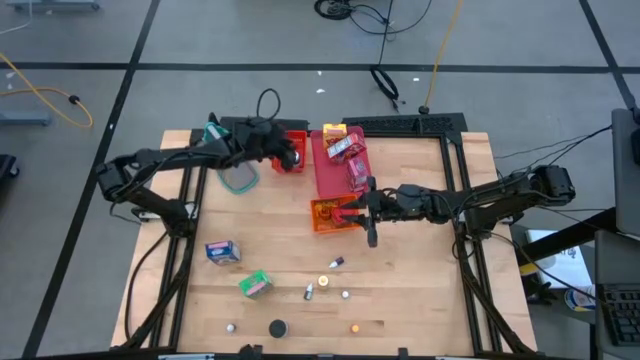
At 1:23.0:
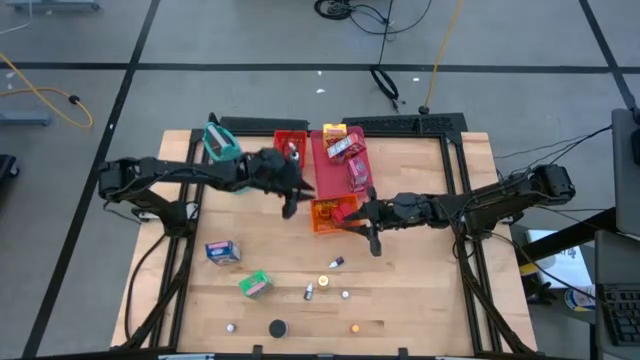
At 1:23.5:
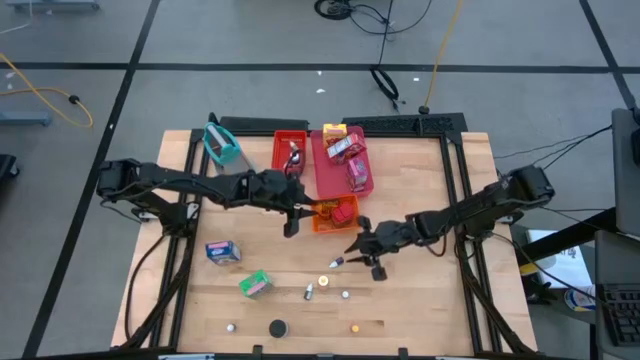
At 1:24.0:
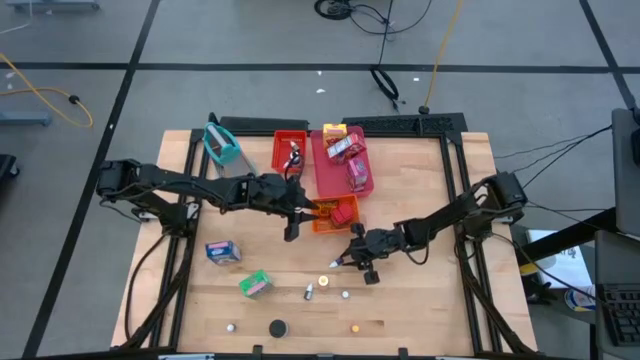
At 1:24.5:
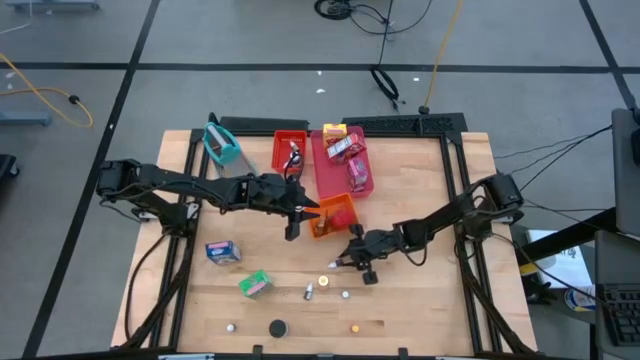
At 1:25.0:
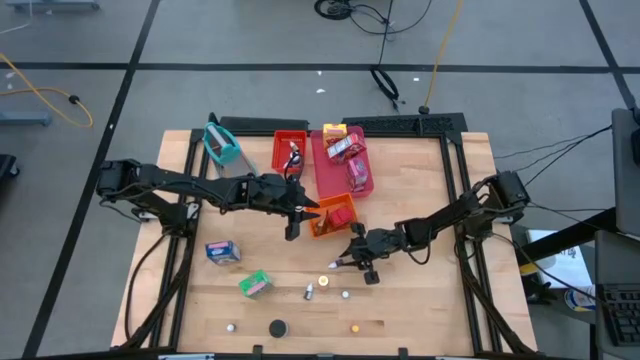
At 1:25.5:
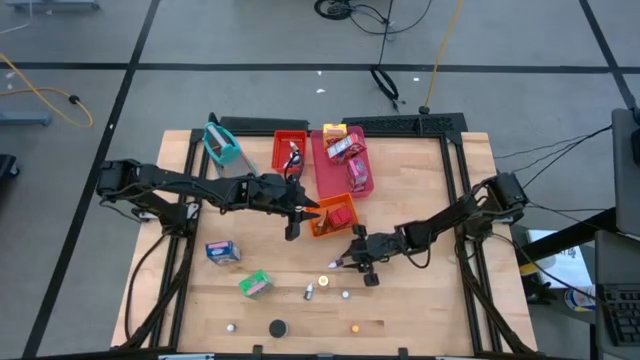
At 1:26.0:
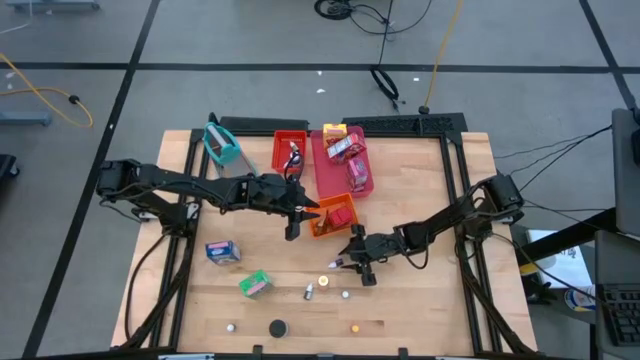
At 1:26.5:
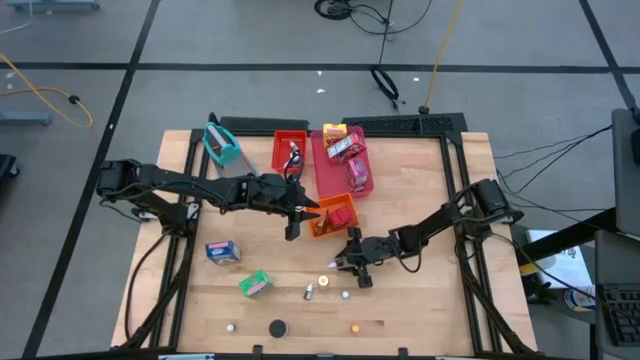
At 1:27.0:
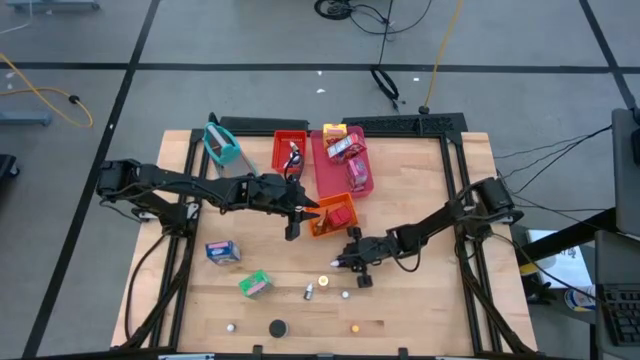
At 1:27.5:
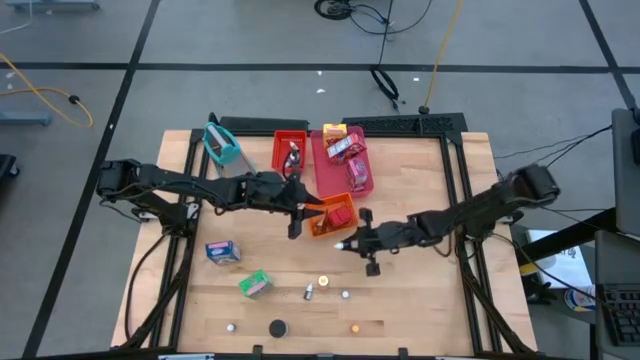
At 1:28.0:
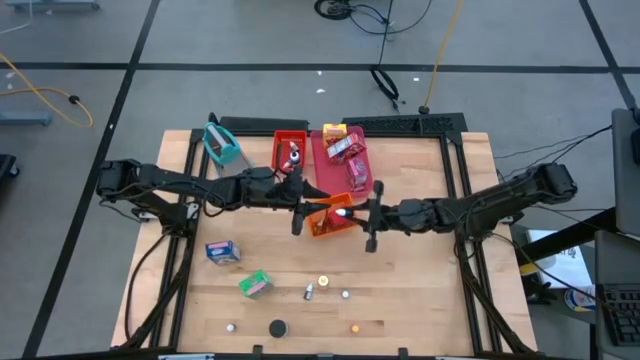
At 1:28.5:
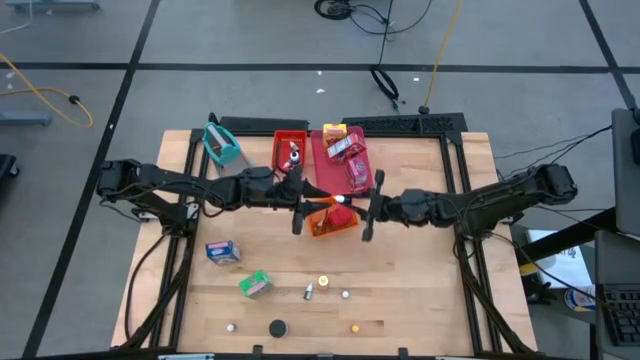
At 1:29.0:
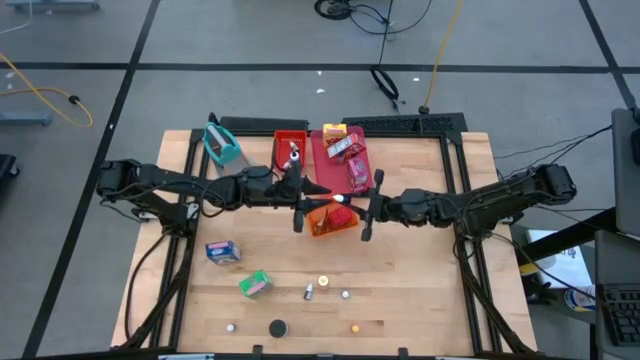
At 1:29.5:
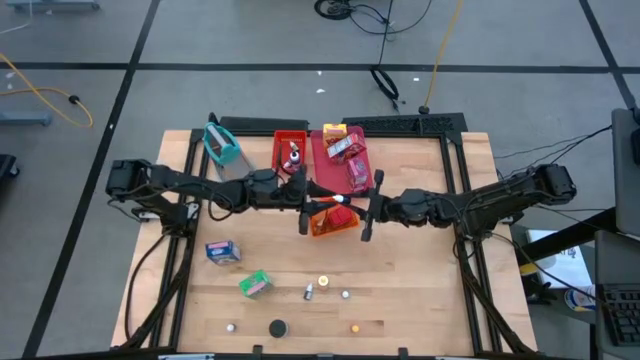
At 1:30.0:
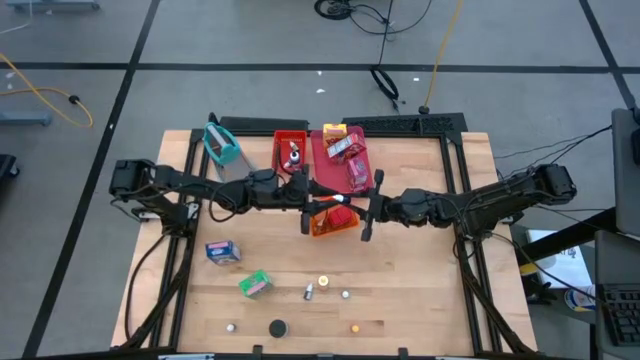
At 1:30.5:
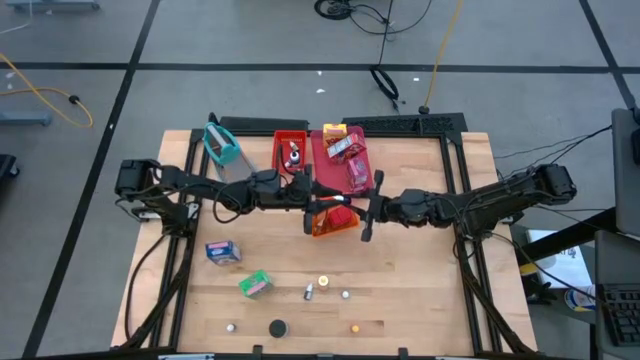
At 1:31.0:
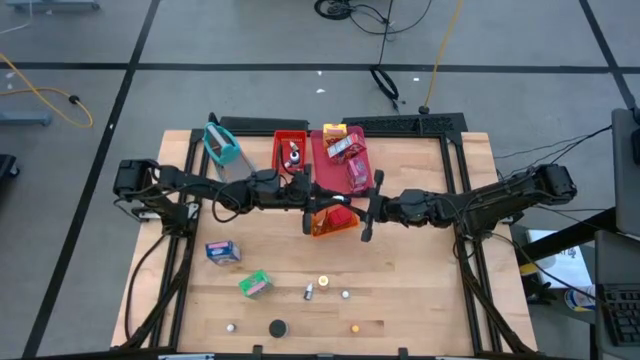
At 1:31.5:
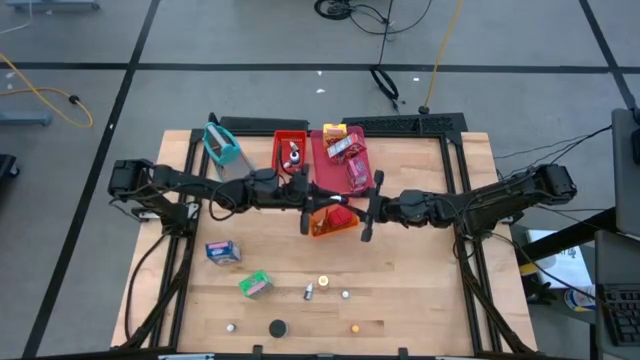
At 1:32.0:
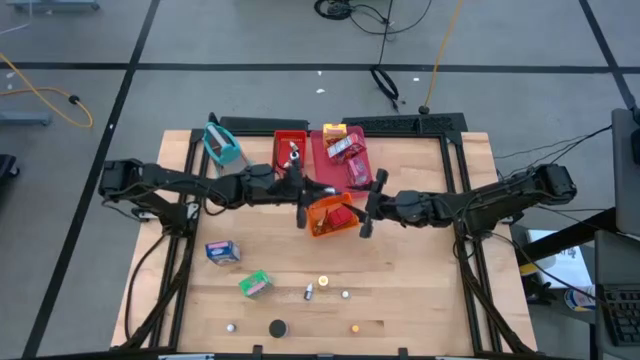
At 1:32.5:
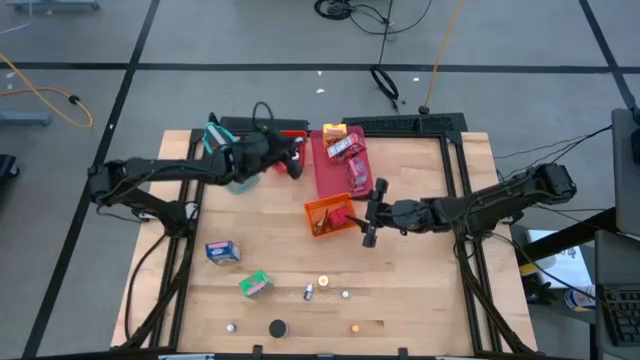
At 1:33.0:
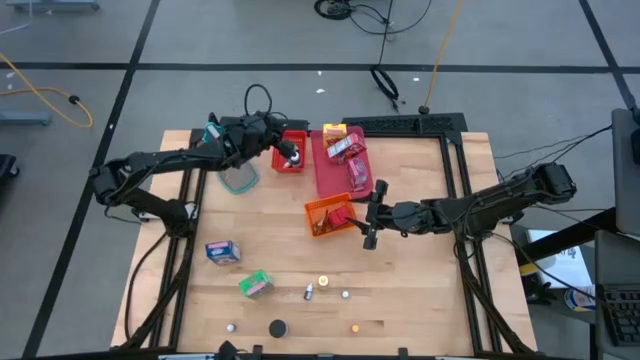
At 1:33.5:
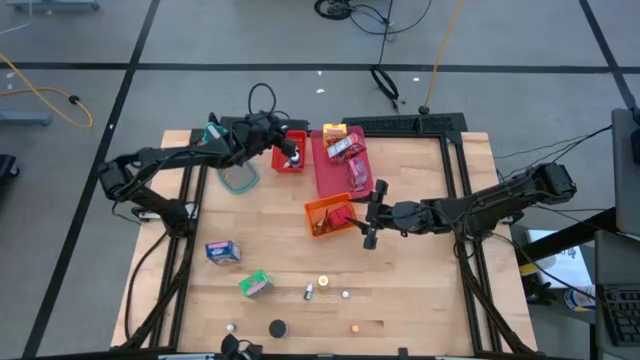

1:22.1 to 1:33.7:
Task: Pick & Place Kitchen Items
Put the purple food coloring bottle into the red bin

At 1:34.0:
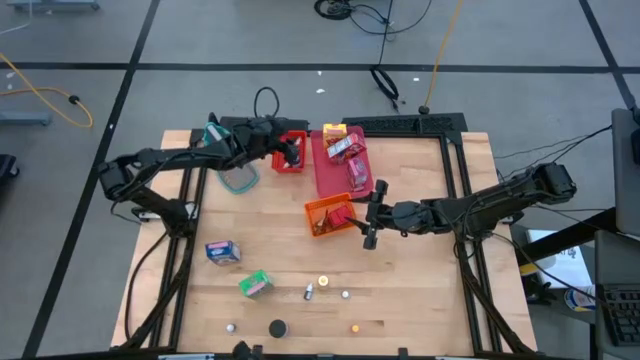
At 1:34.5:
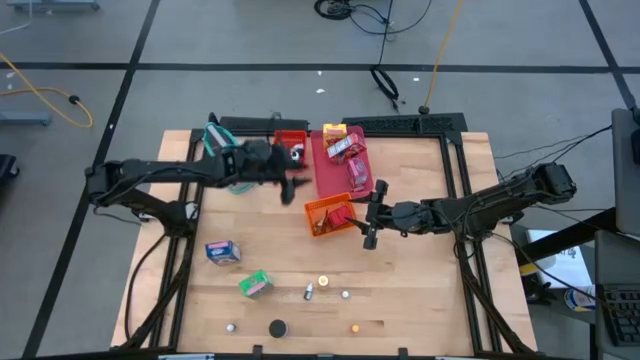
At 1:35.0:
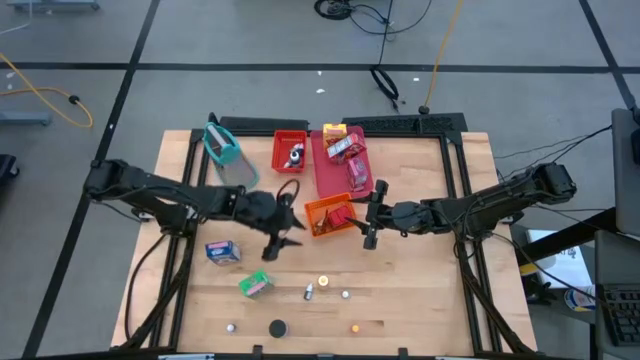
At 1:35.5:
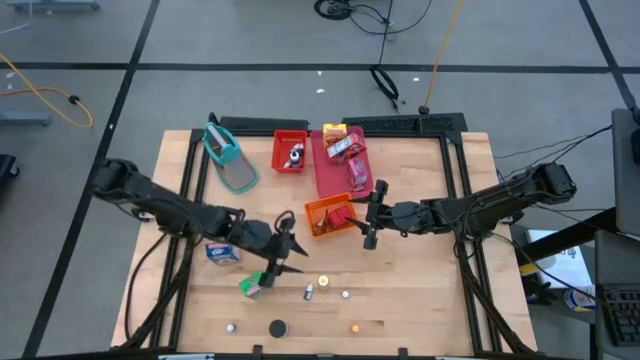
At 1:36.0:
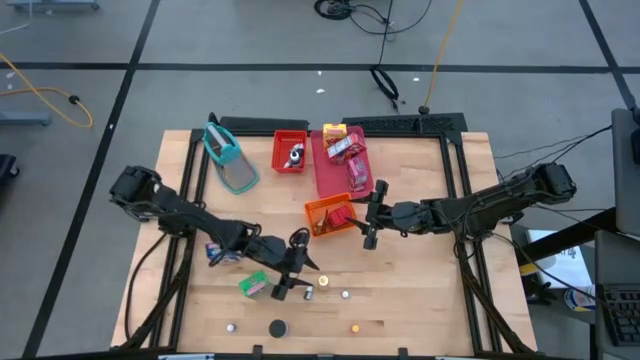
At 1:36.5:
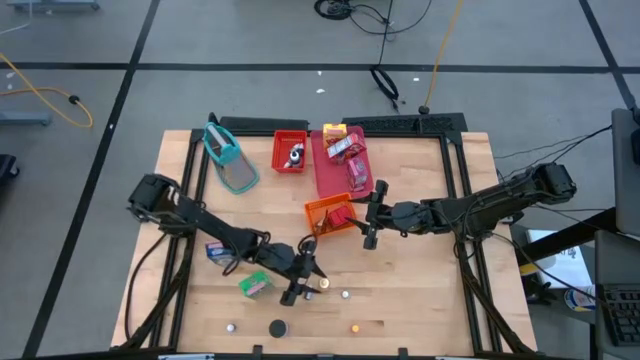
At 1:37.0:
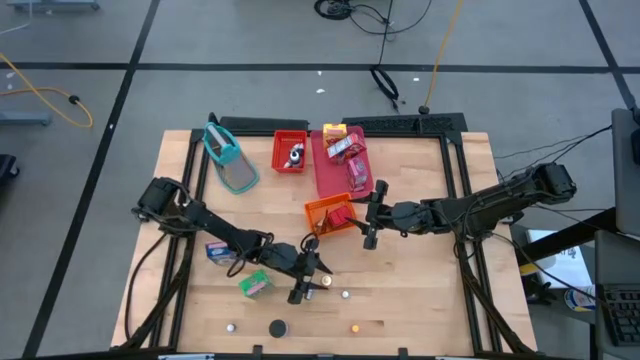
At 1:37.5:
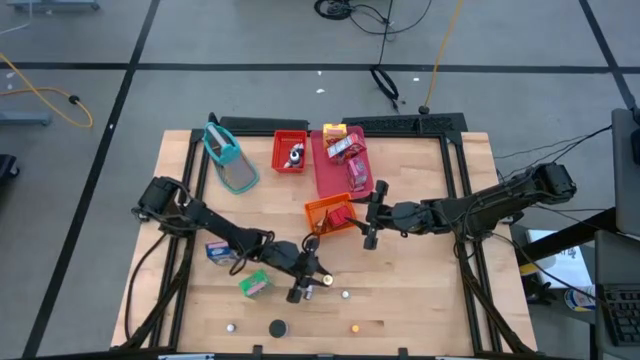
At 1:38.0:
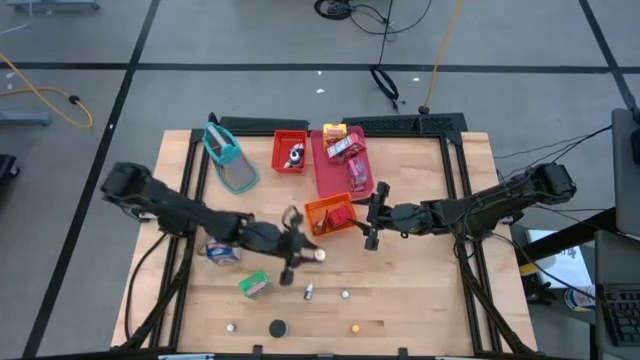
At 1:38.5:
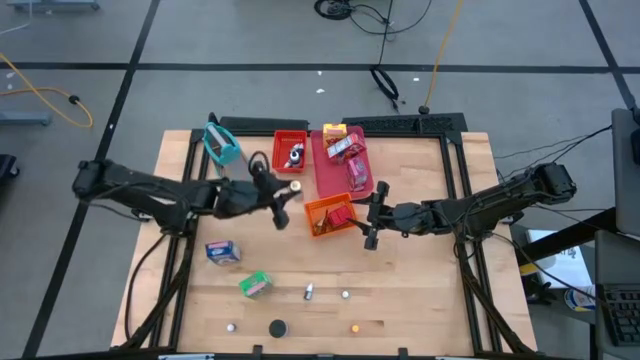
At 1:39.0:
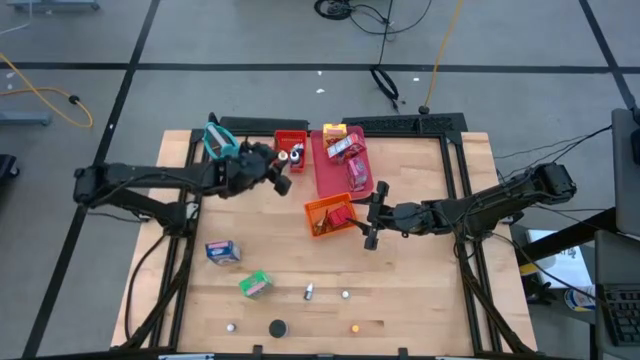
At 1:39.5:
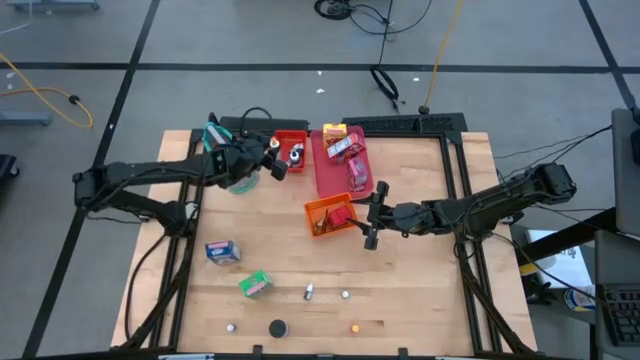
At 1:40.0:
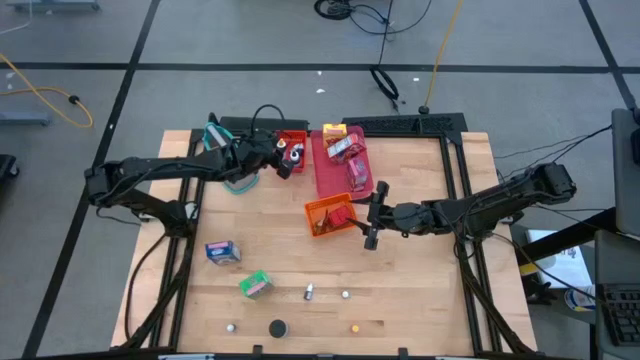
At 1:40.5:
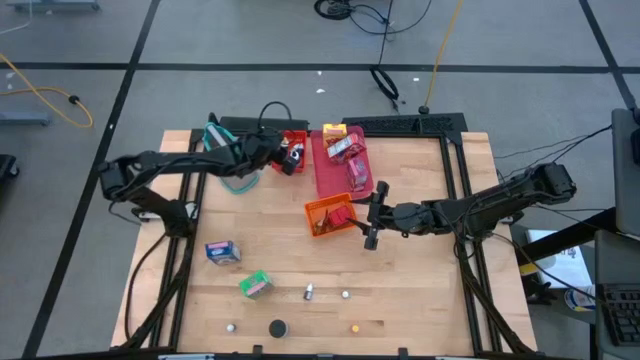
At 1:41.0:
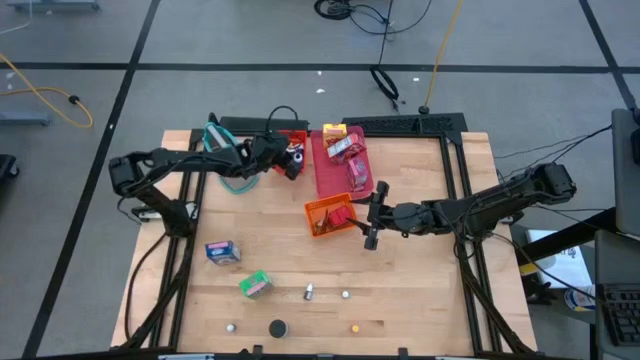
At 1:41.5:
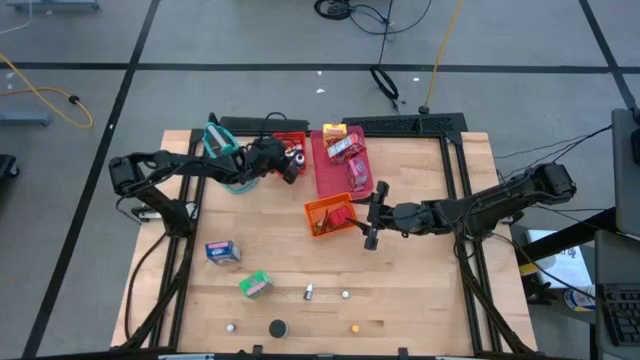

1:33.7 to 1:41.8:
Put the yellow food coloring bottle into the red bin

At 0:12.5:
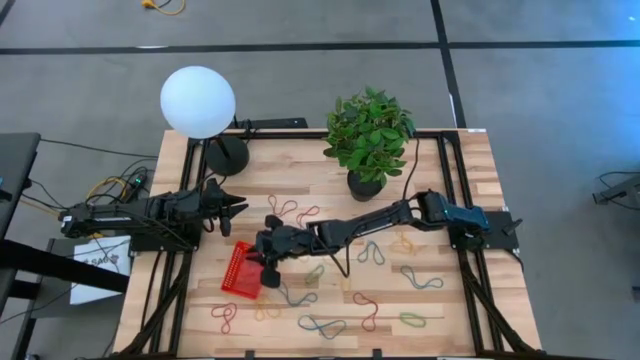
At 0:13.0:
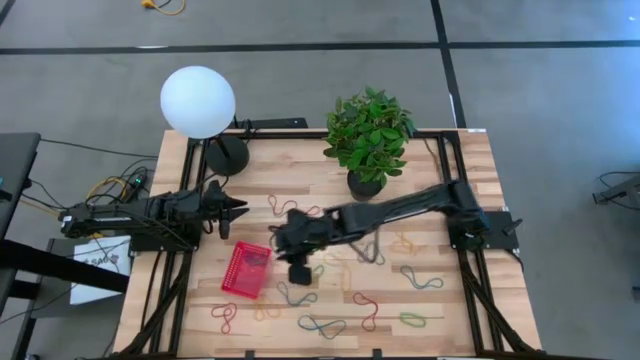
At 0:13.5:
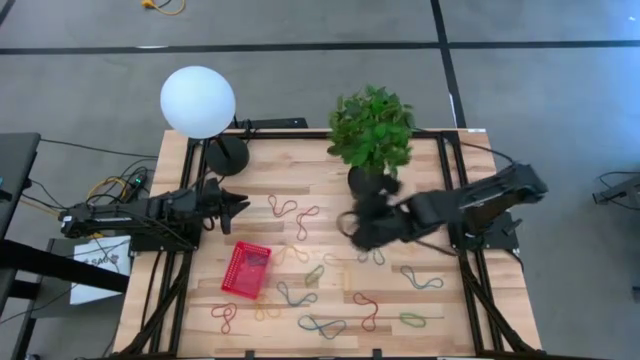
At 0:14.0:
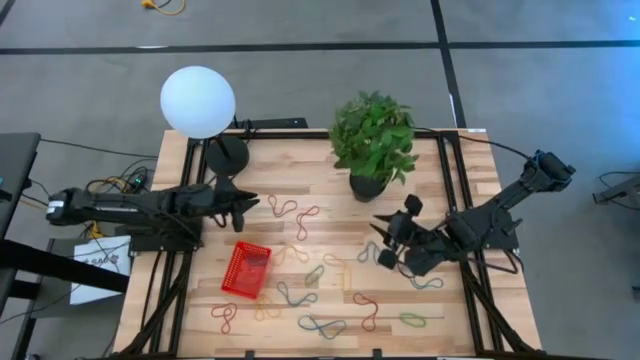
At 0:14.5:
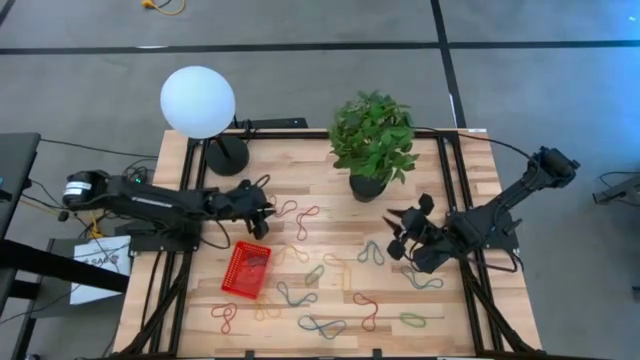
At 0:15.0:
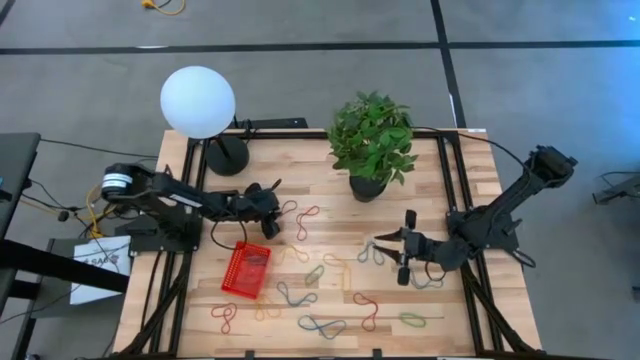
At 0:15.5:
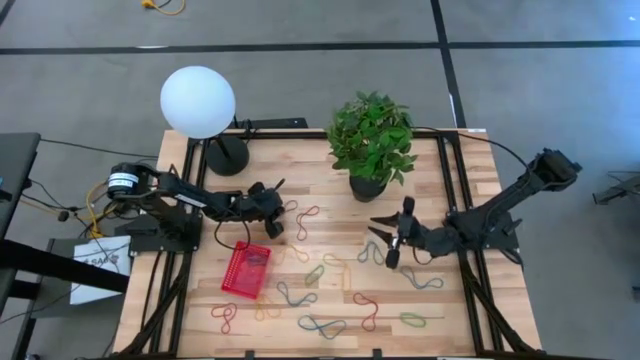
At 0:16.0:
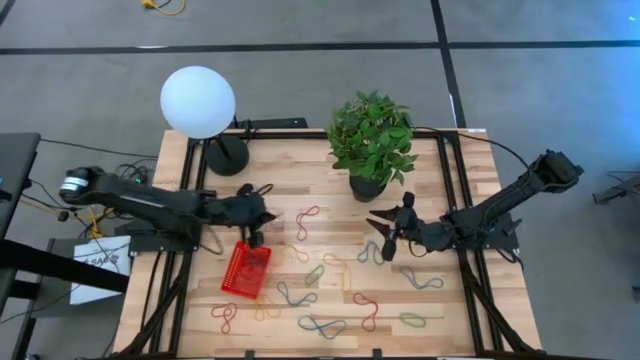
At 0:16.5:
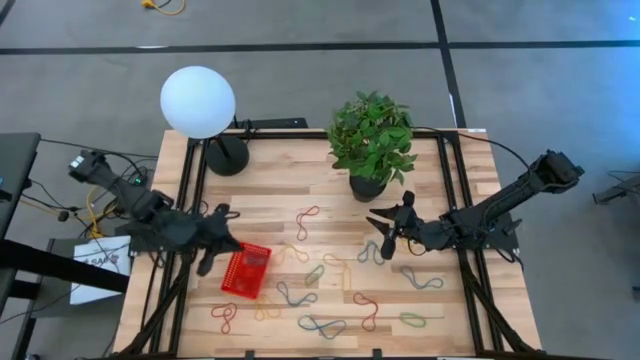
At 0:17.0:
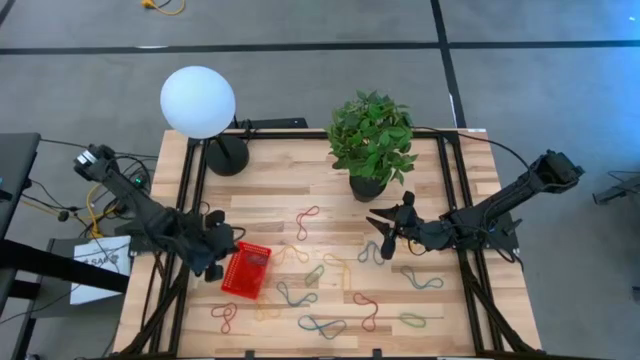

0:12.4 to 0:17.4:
Task: Pick and place items into bin
Put the red rubber band into the red bin
